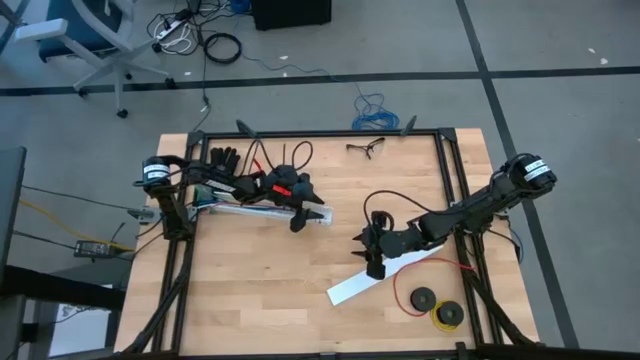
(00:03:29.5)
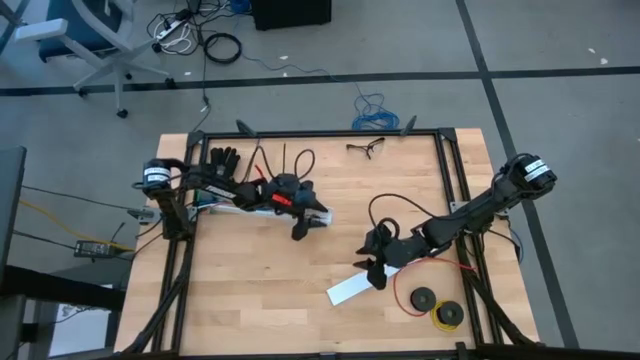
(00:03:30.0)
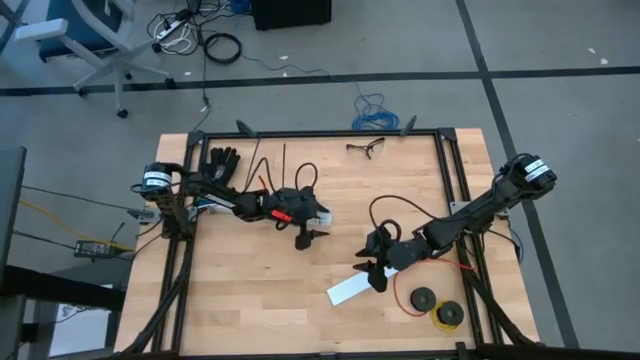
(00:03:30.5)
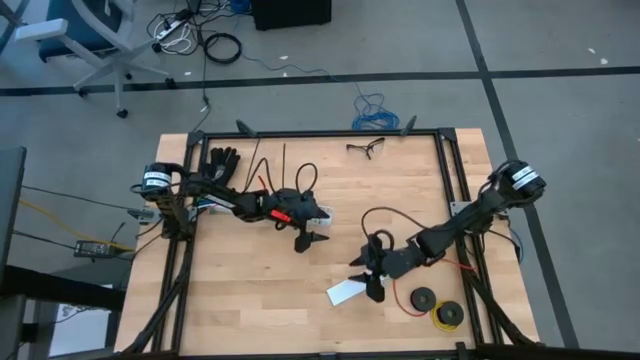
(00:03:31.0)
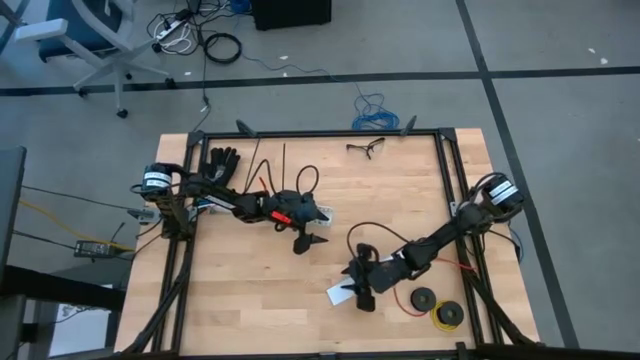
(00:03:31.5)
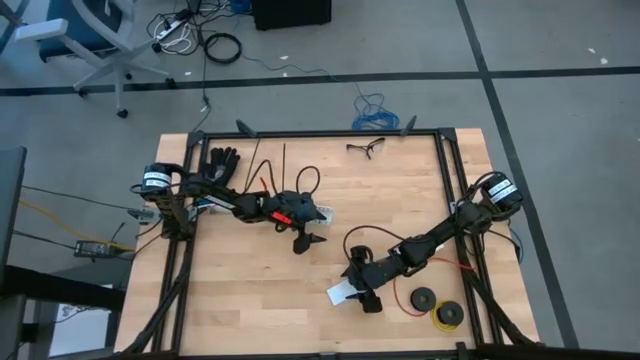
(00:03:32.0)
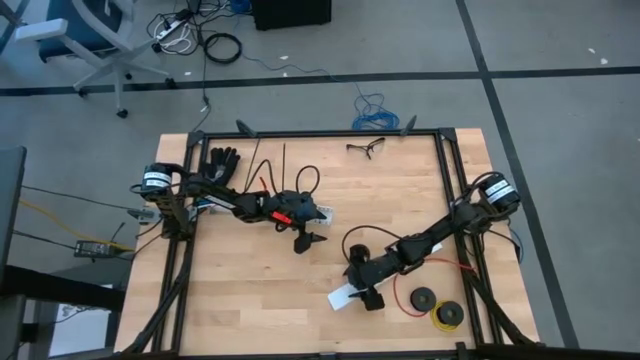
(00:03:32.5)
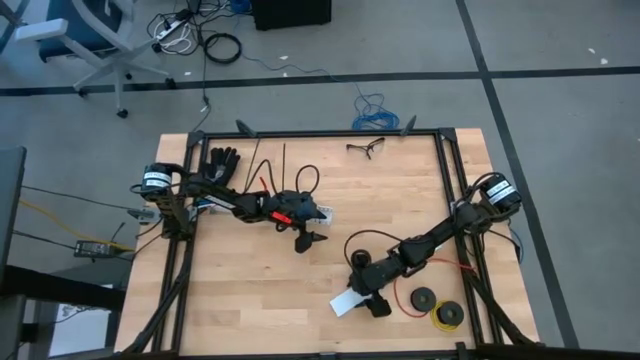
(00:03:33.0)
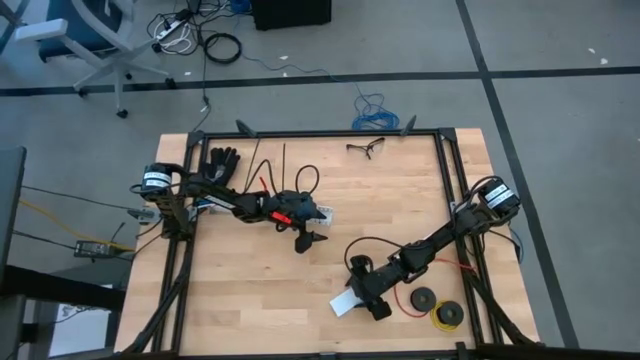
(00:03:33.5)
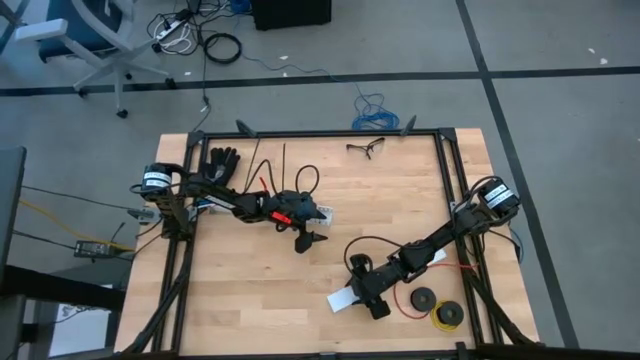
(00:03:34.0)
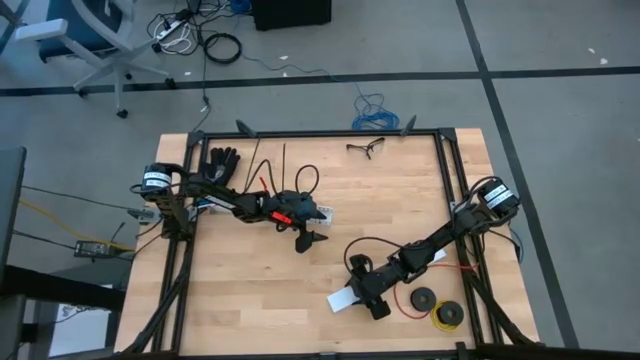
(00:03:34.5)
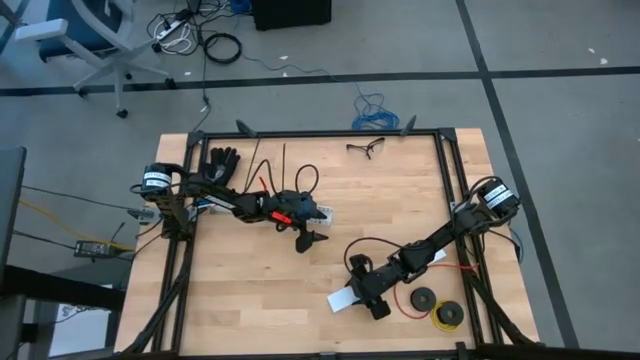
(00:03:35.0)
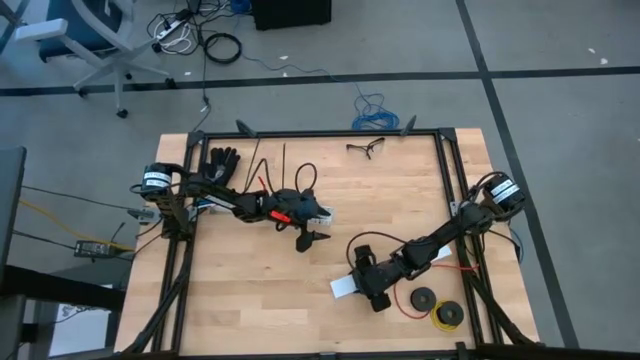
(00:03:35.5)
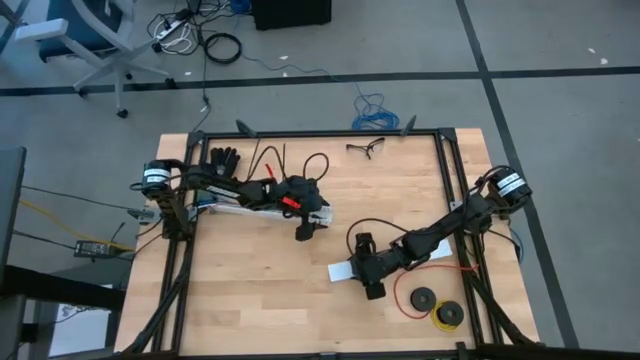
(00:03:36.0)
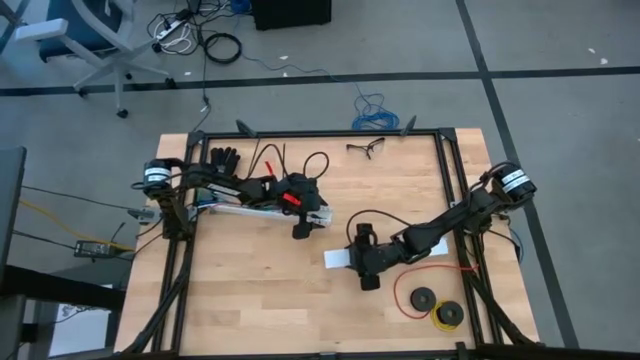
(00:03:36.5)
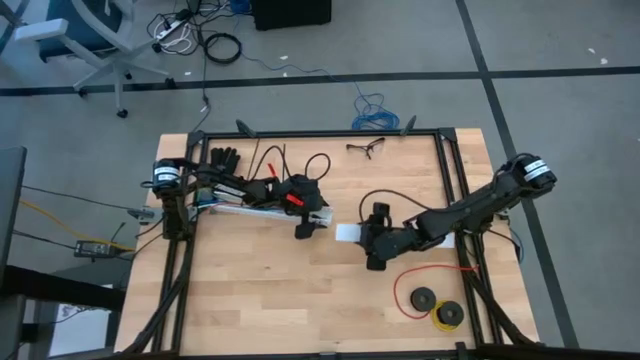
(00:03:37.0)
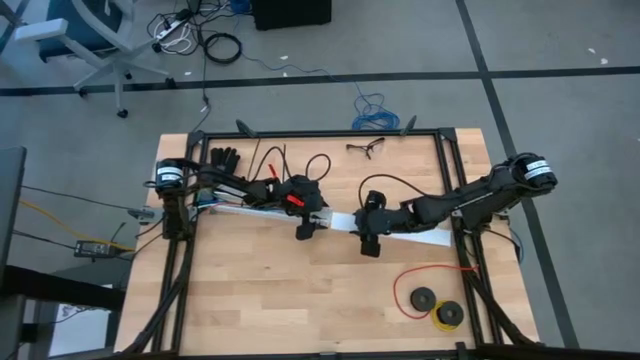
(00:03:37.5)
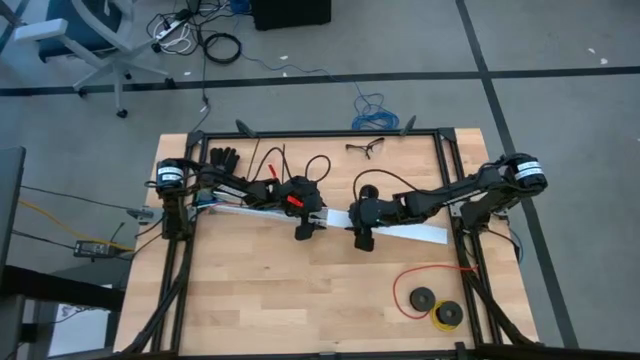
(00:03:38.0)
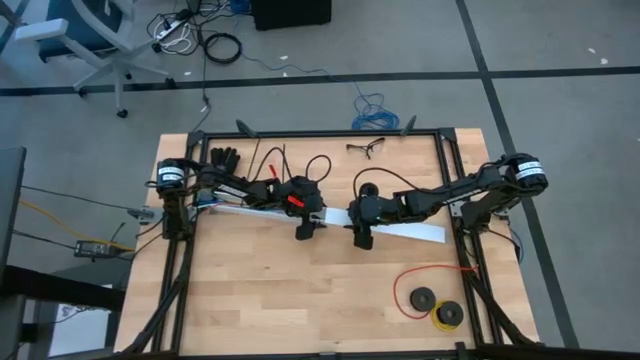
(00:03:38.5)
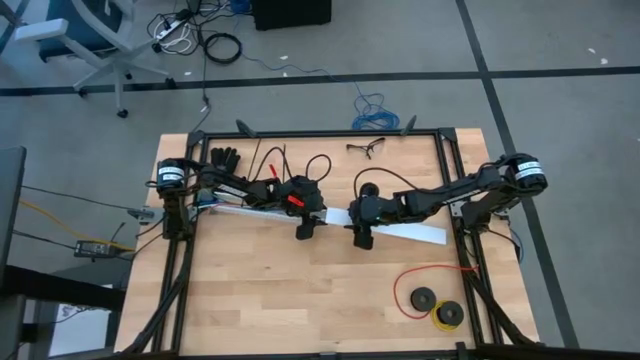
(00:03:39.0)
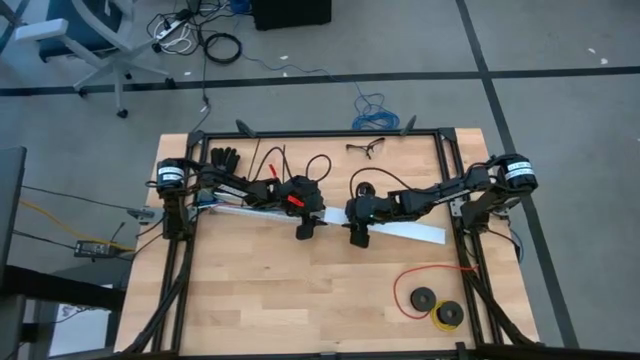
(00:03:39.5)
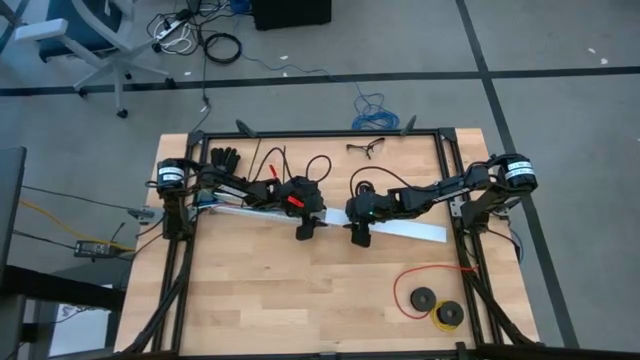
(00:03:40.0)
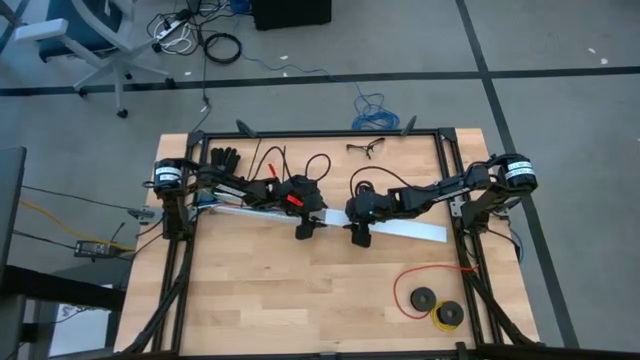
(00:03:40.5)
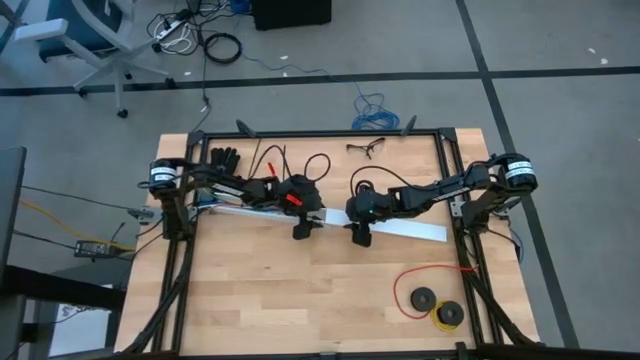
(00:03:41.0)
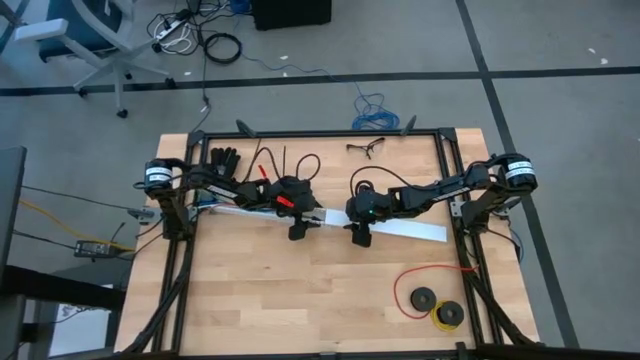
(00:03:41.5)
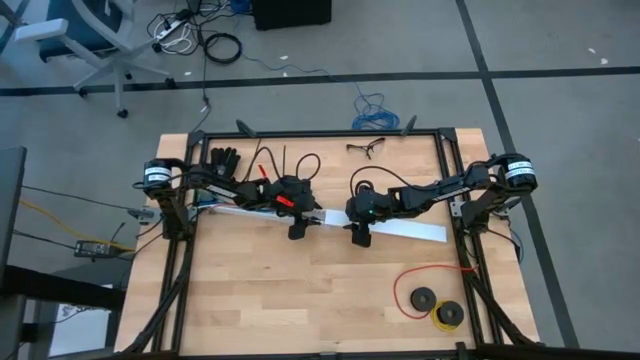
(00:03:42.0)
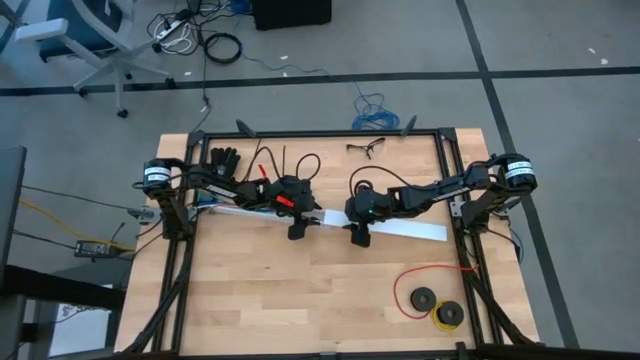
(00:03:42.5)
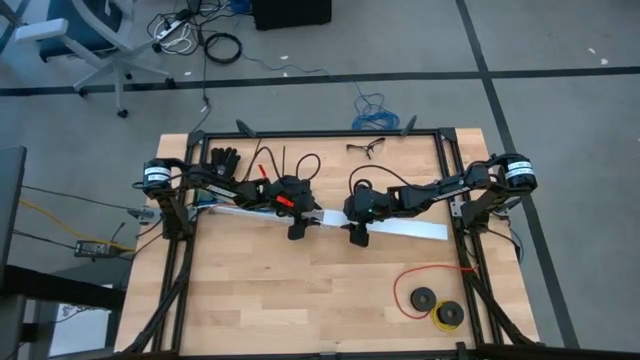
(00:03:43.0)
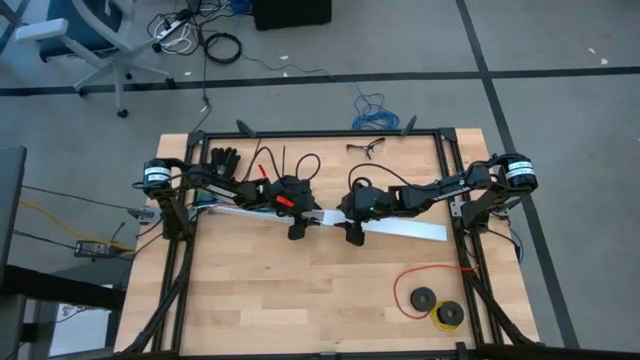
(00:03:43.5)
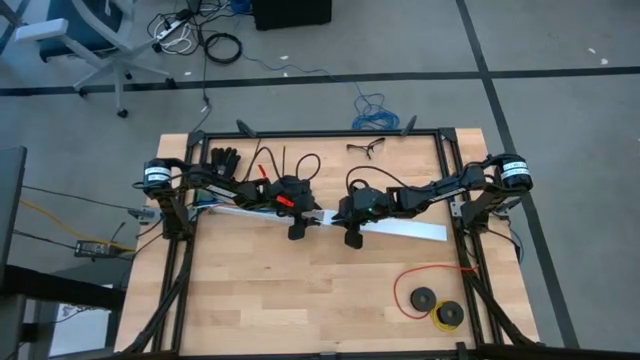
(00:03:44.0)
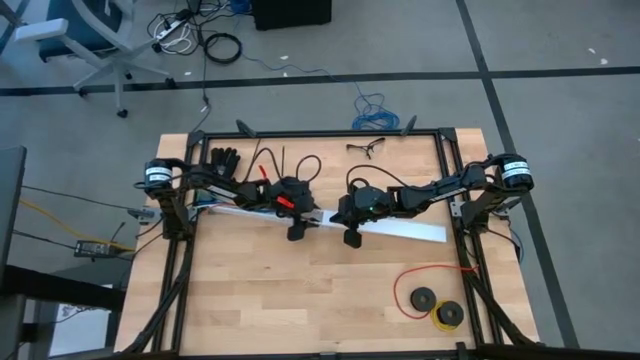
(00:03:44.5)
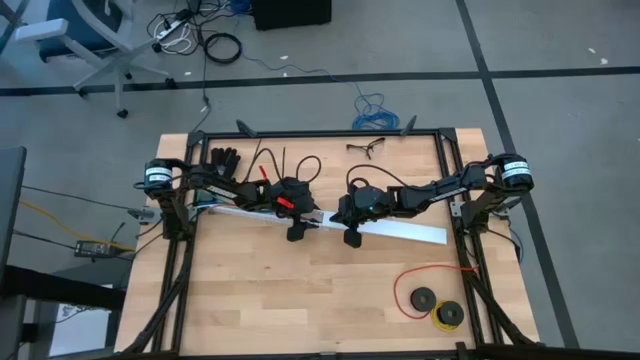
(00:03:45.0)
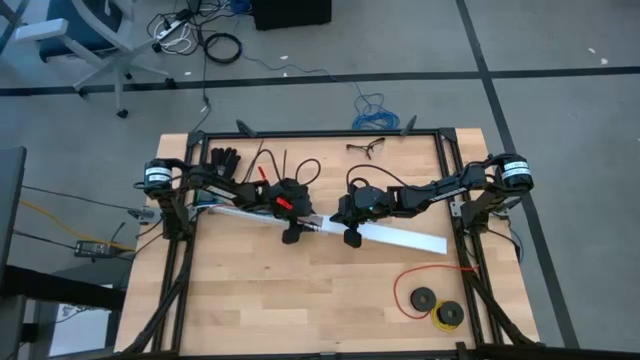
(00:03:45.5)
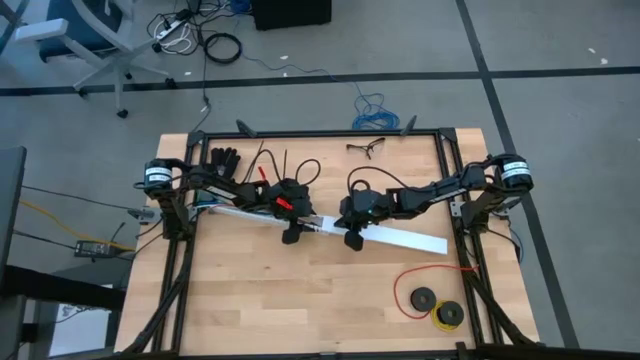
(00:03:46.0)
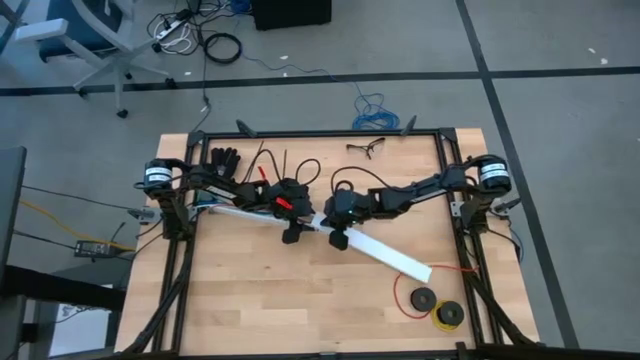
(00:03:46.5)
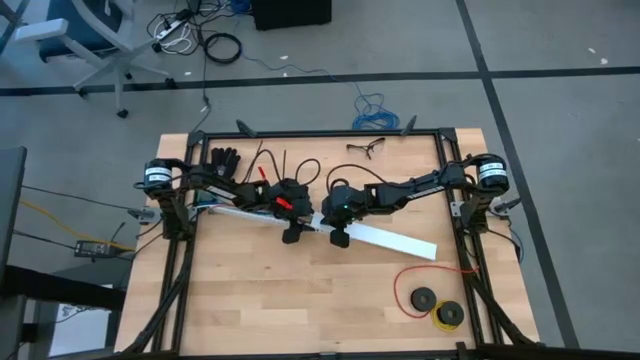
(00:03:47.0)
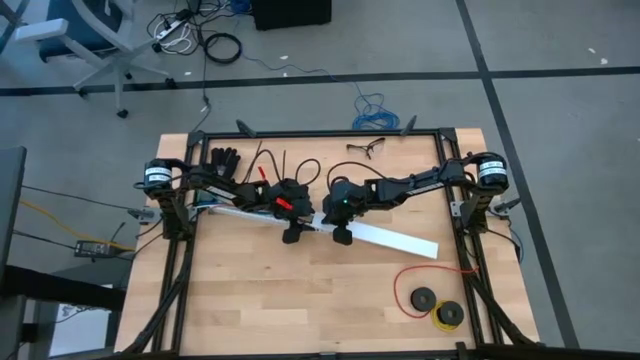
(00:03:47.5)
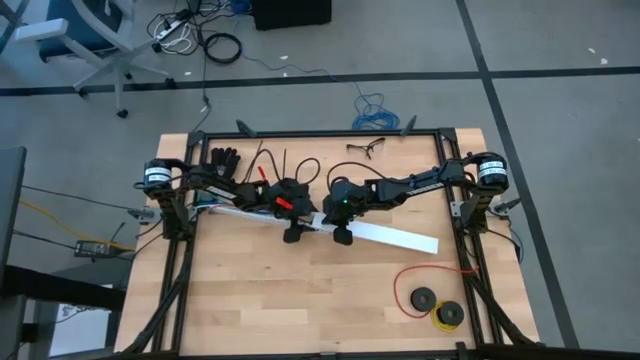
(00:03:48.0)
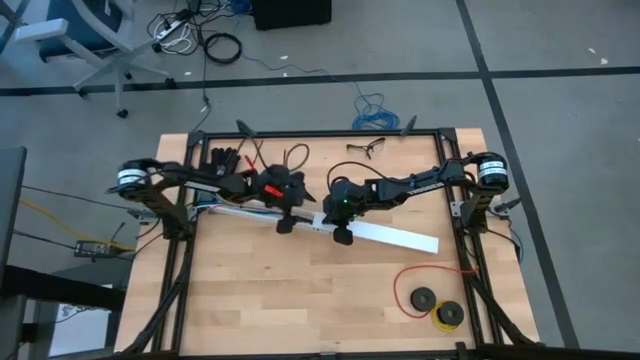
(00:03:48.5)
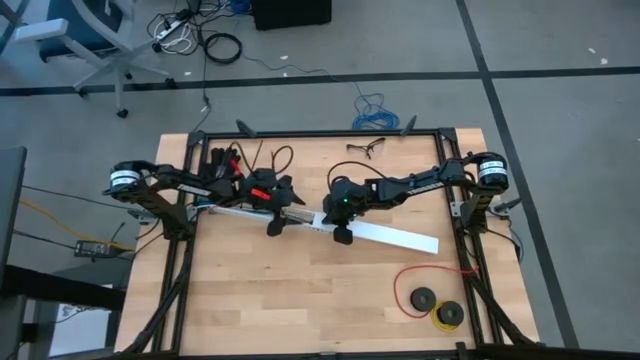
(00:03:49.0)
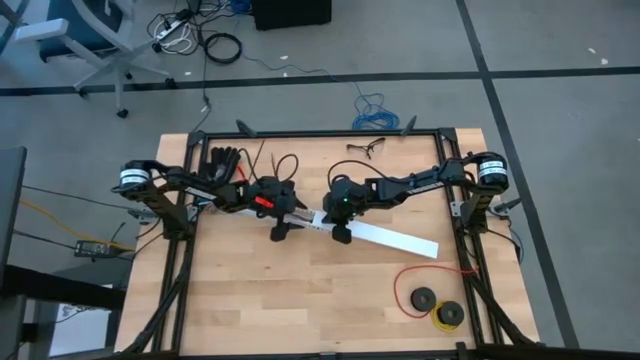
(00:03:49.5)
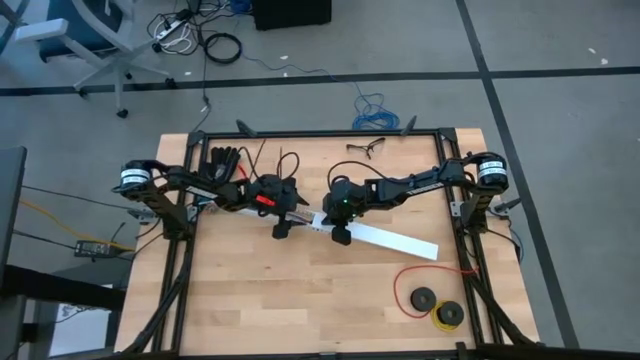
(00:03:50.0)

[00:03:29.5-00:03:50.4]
Task: Ziptie cables
Close the white cable duct
